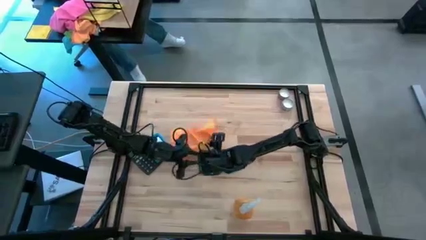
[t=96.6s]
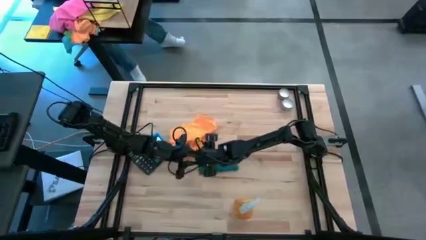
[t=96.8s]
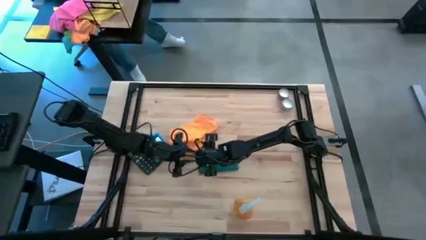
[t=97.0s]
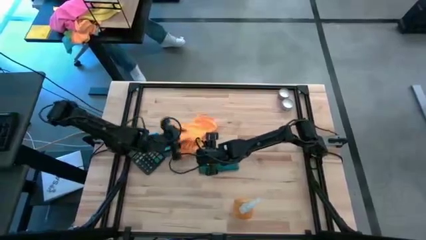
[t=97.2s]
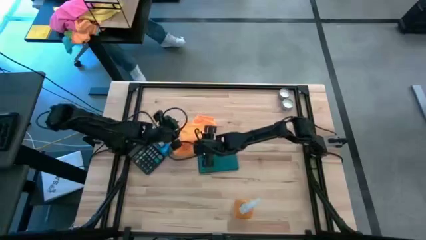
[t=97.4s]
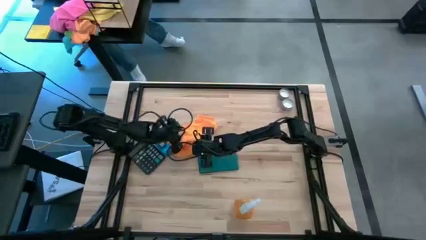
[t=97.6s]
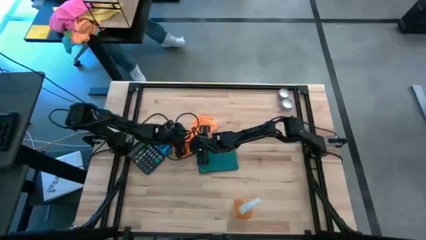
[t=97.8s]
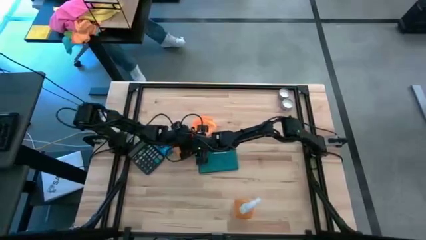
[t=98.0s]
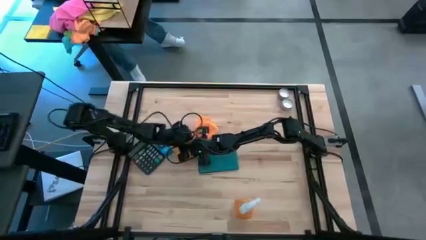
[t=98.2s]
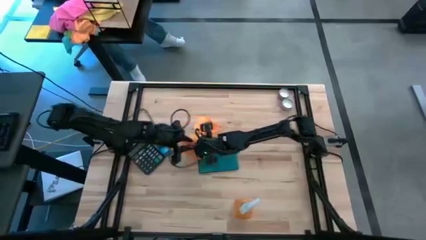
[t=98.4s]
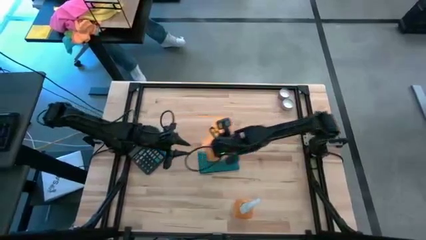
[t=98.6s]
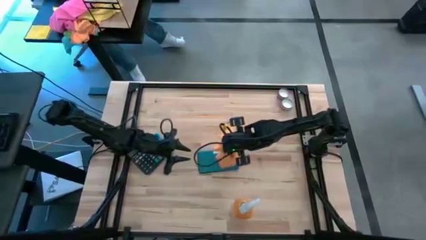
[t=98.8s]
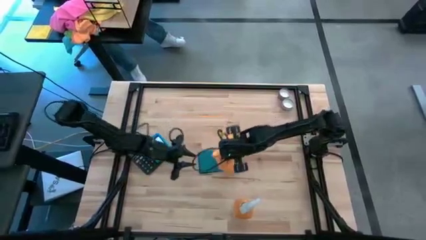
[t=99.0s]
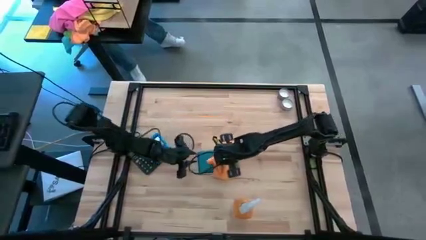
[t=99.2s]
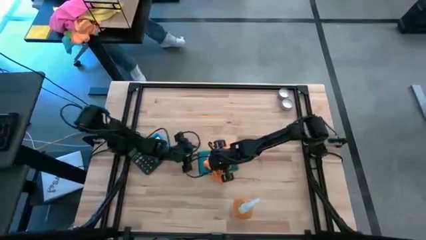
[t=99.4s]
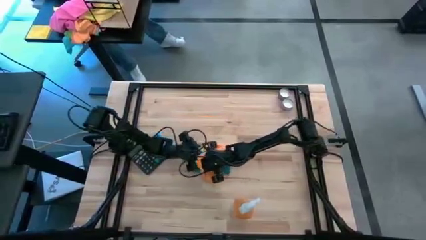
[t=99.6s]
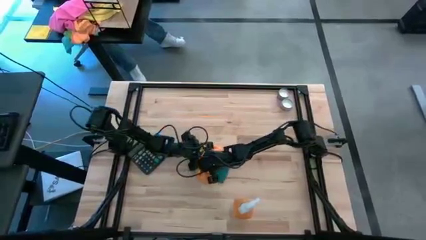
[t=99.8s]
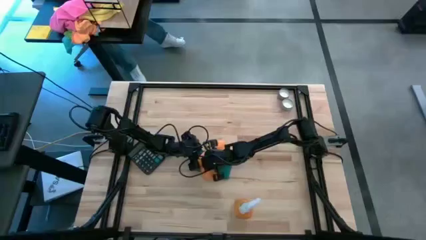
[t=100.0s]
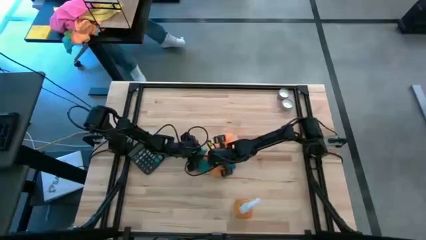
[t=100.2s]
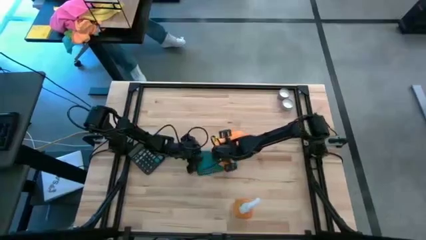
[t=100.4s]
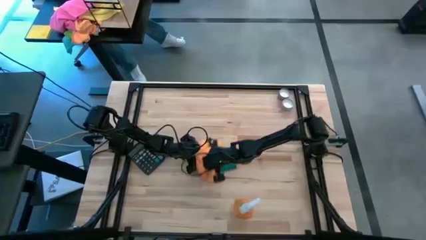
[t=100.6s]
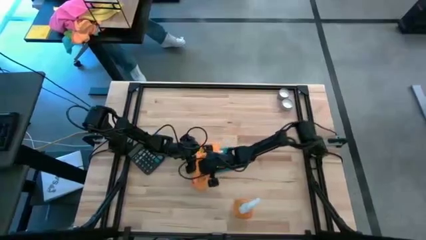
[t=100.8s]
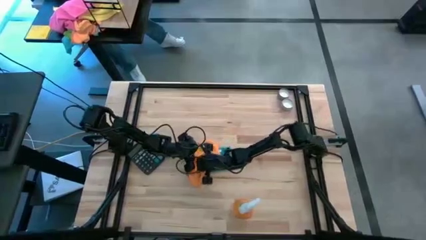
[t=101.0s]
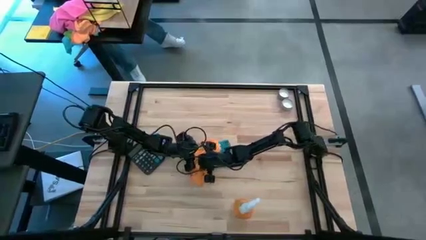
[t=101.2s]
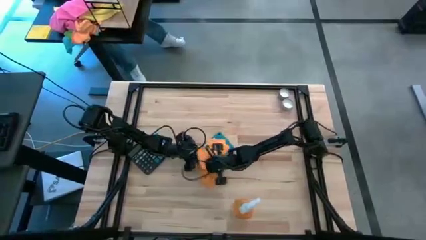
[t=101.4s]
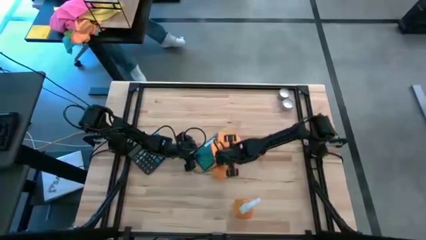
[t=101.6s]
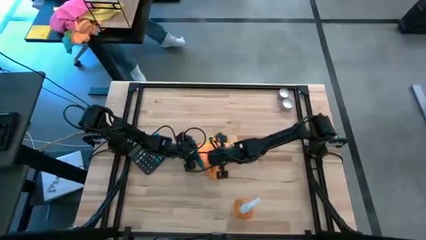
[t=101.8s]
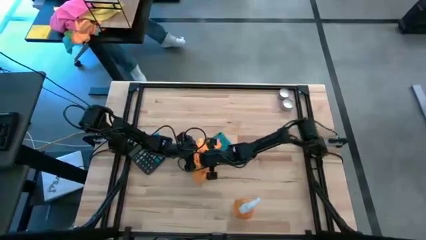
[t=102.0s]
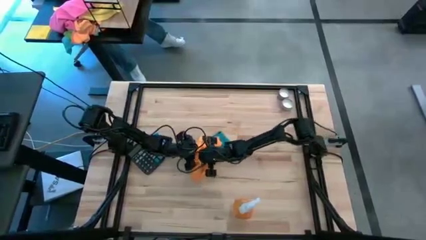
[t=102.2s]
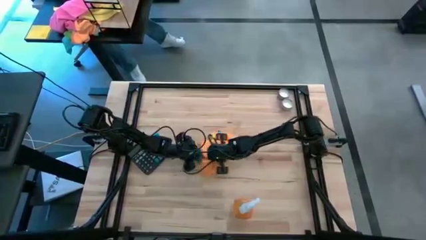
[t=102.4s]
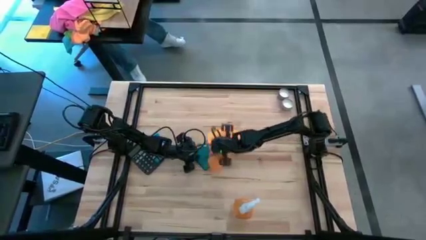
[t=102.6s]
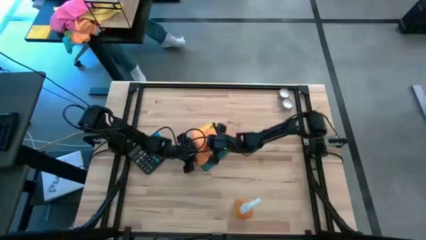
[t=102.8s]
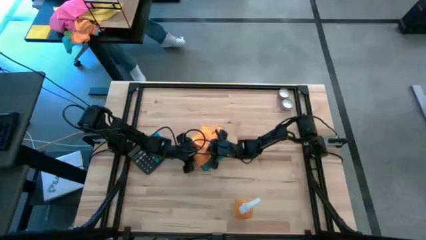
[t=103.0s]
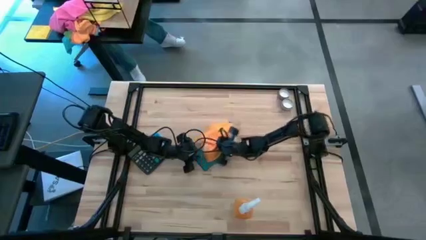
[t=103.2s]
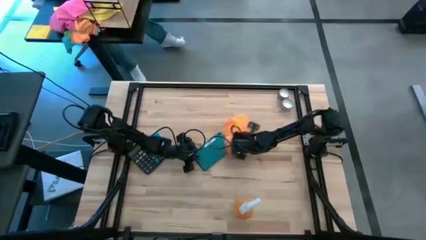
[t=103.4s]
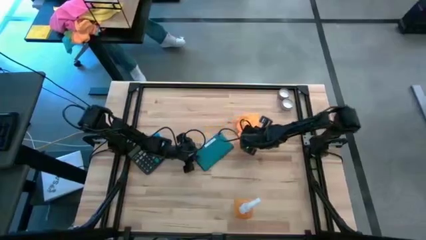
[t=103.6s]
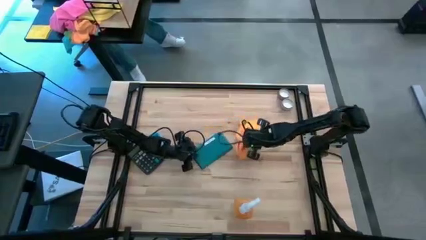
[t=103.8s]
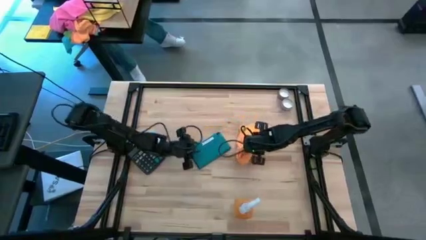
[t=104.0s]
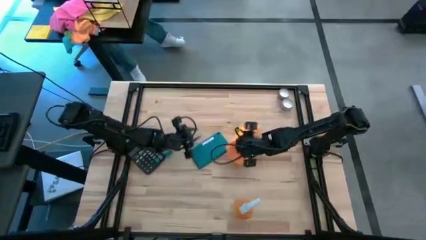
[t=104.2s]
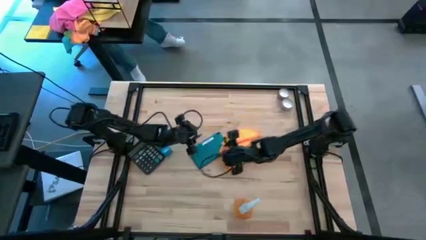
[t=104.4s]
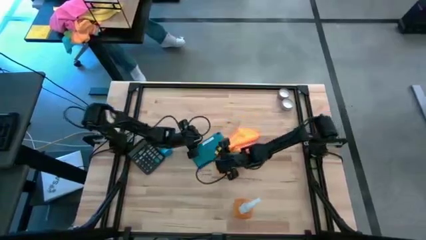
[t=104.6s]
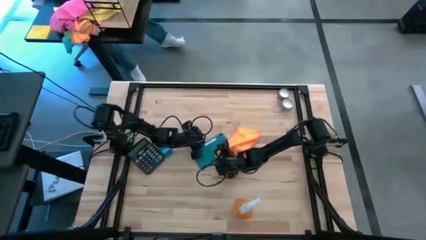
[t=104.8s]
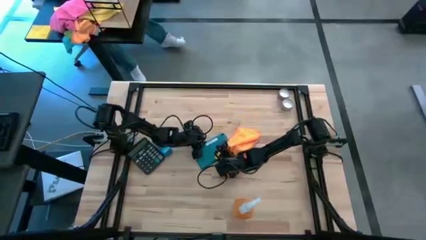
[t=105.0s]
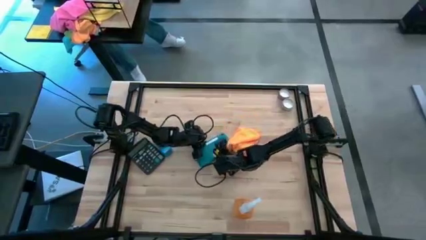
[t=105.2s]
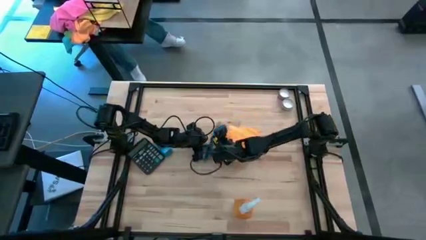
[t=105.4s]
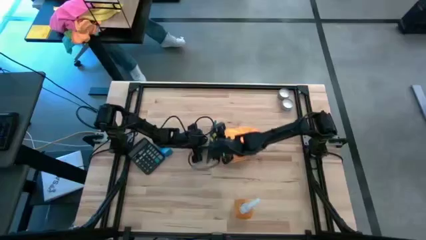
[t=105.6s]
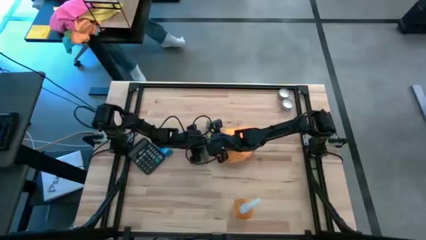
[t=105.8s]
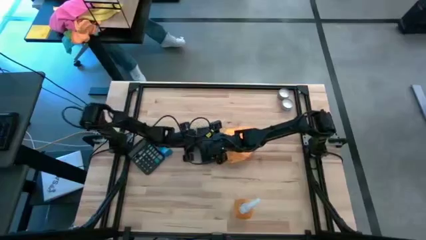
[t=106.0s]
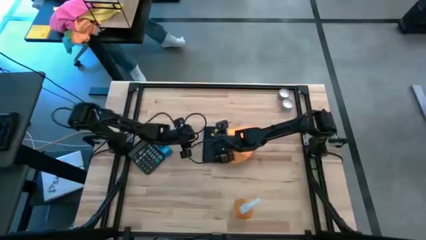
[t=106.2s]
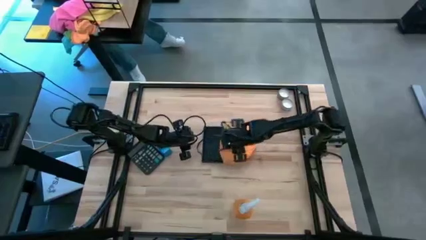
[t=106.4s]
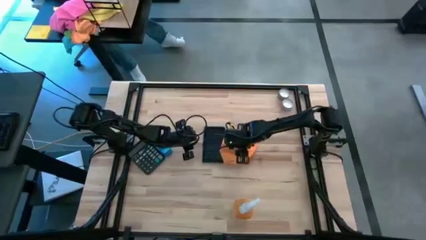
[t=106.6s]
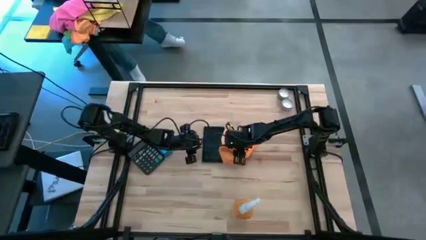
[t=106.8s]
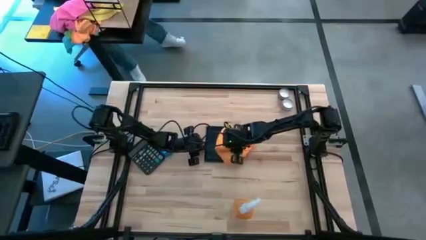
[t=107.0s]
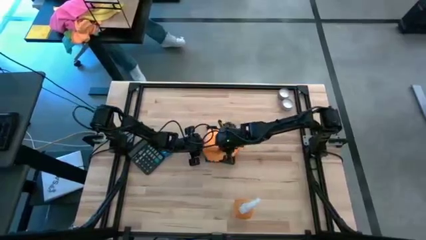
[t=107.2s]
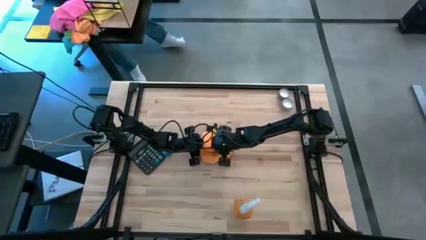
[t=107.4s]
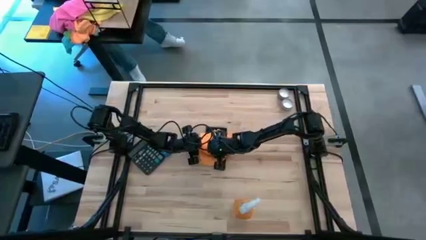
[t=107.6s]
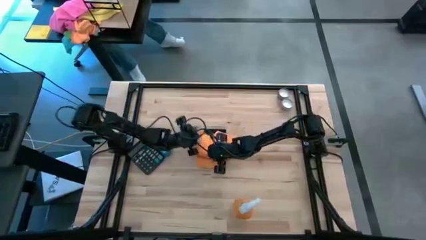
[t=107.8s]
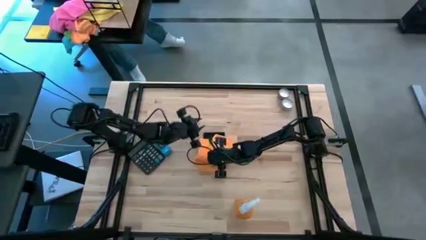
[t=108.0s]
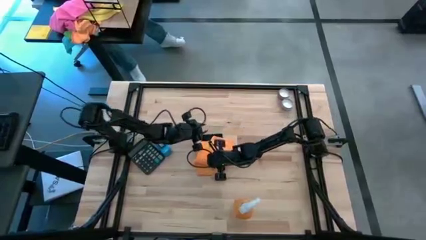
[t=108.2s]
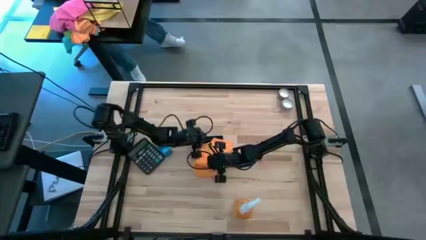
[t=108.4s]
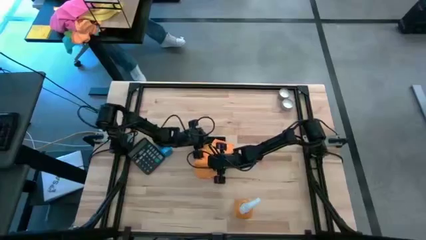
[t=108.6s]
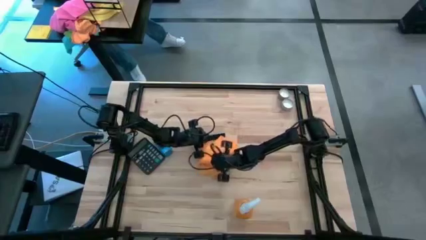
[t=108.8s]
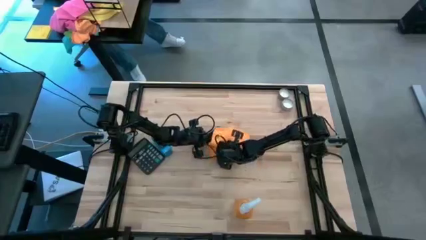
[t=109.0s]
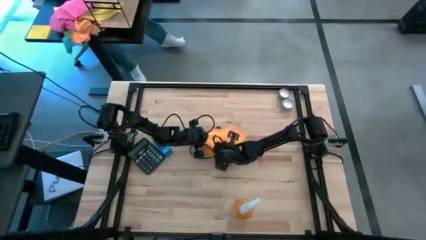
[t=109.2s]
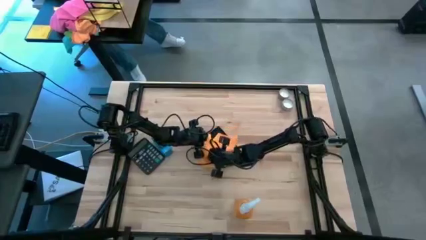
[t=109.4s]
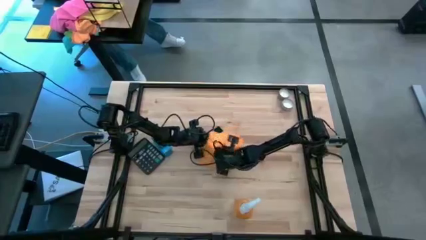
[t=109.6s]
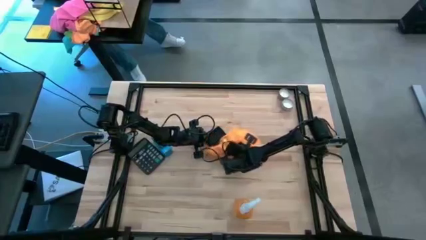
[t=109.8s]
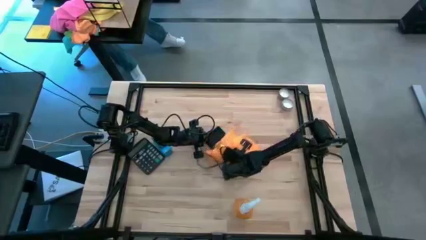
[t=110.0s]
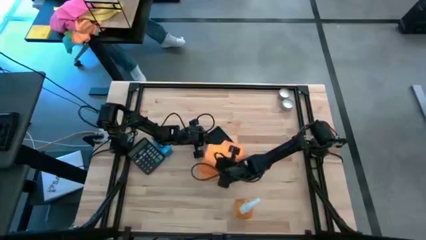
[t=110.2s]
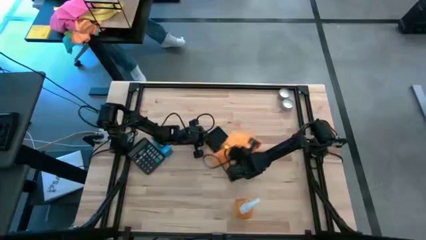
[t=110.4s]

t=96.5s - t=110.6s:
Task: Apply microfiber cloth
Wipe the back of the blue phone with the orange microfiber cloth
